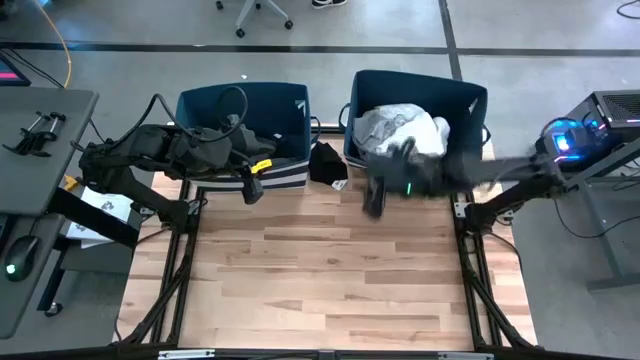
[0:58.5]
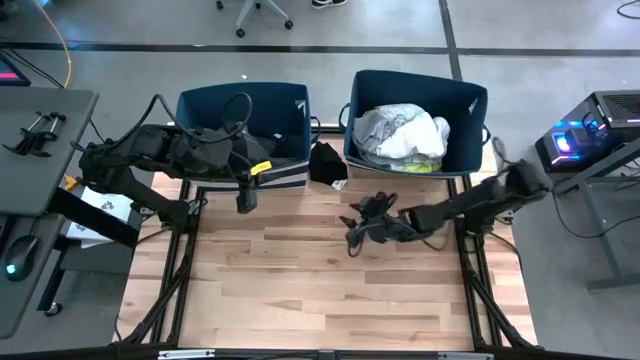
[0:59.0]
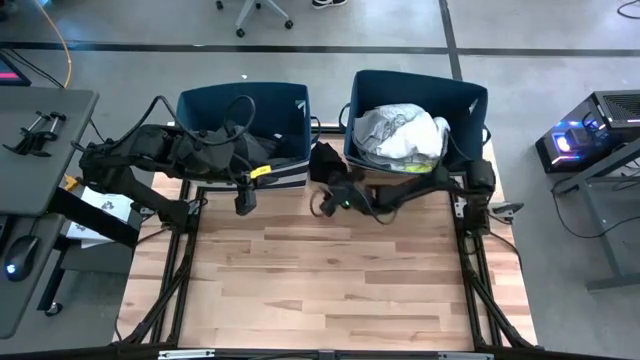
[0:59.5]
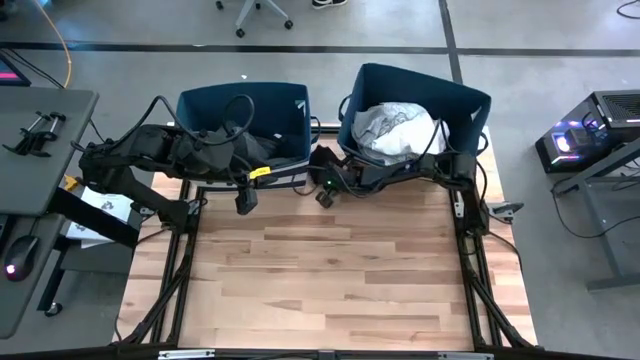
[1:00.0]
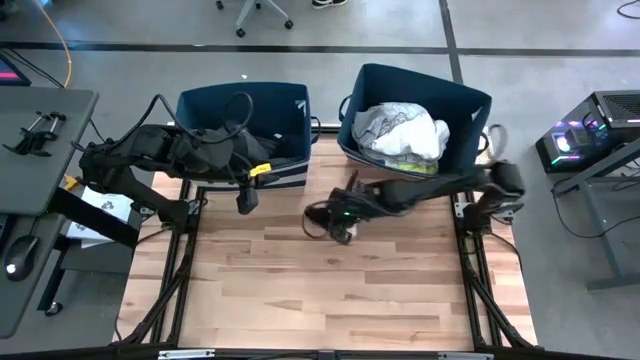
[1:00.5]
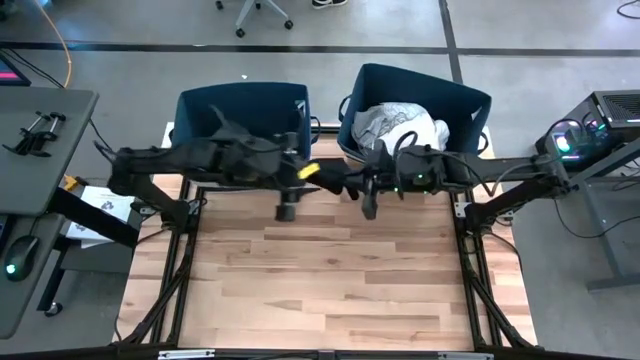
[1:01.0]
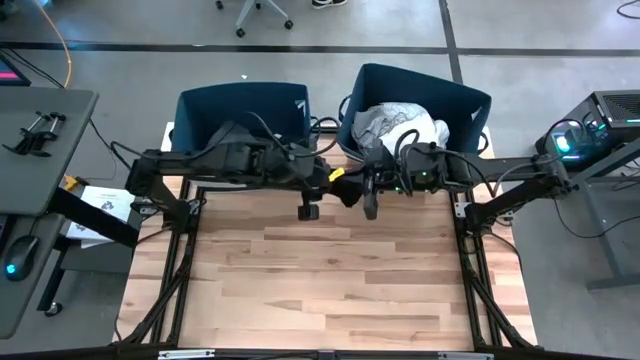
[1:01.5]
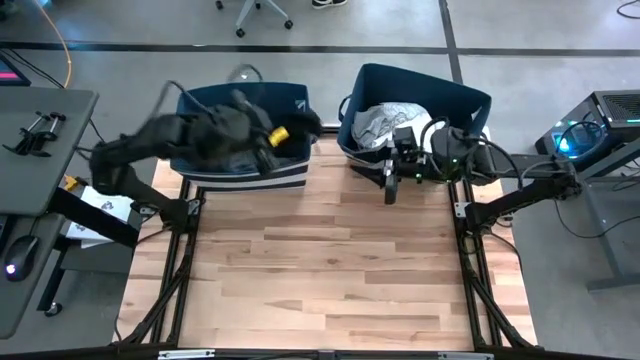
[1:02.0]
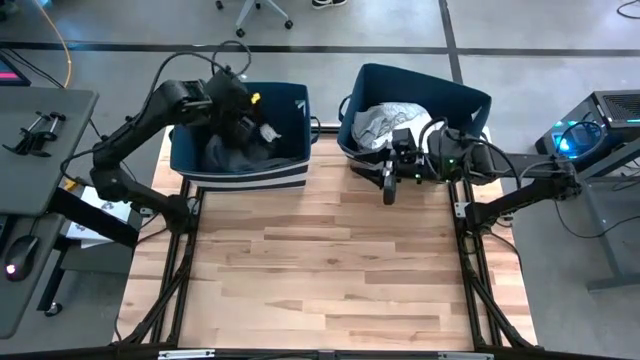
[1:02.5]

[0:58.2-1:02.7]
Task: Sort clothes
Put the black underwear into the left laundry bin

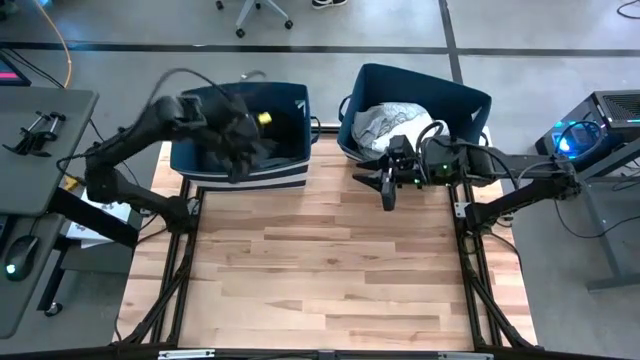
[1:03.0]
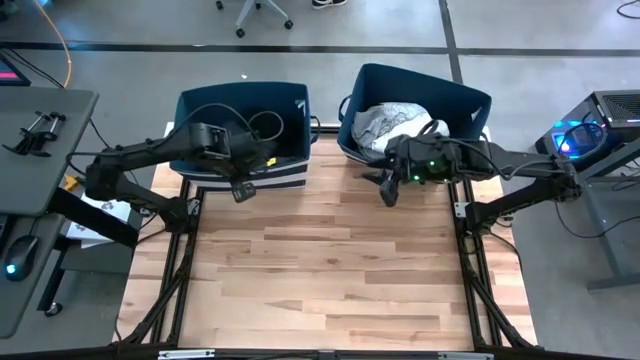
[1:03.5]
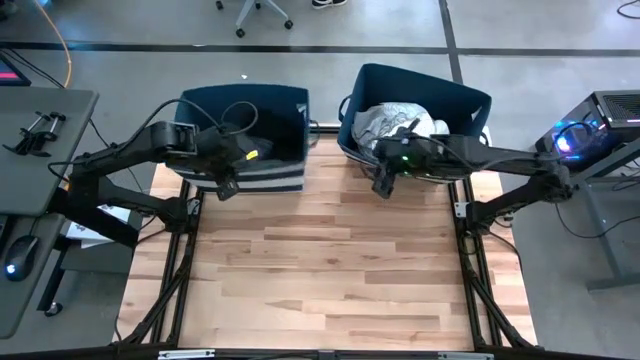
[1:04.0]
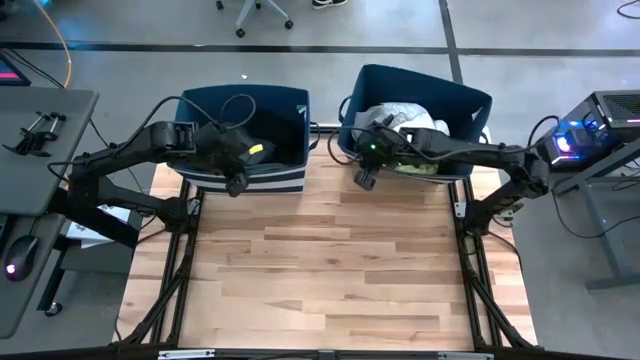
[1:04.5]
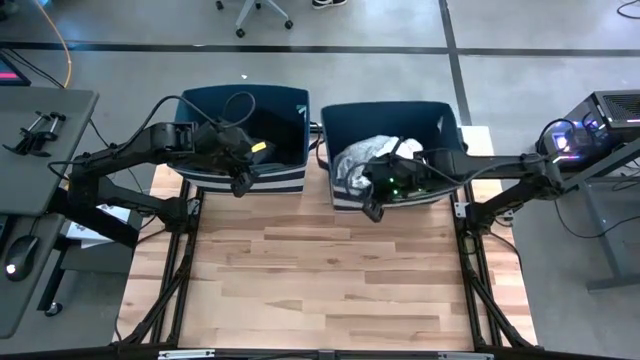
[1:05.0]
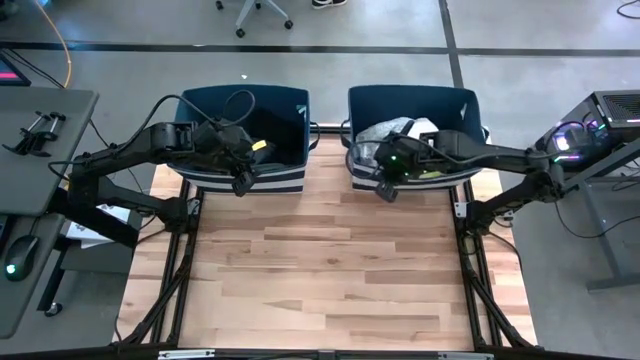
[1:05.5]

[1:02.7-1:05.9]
Adjust the right laundry bin

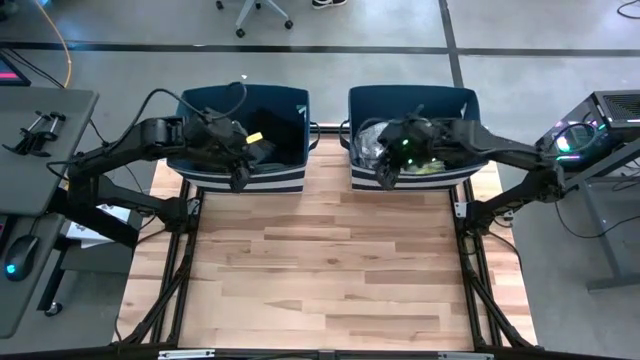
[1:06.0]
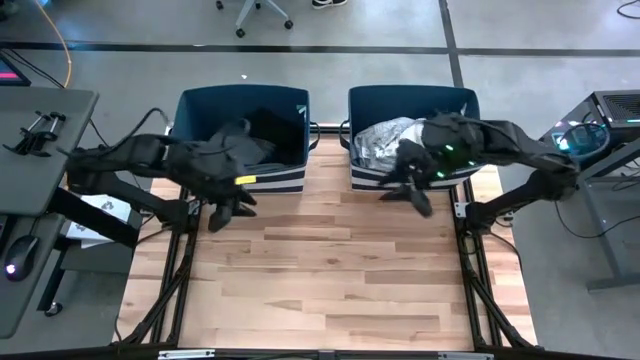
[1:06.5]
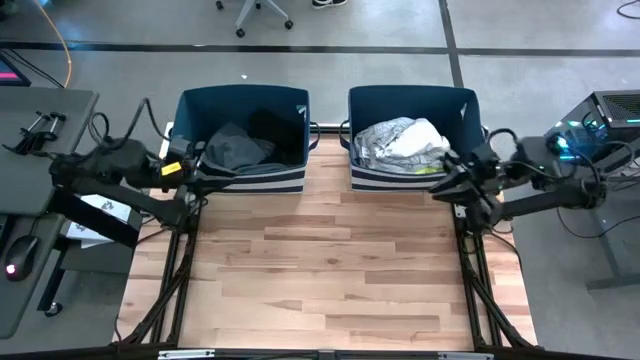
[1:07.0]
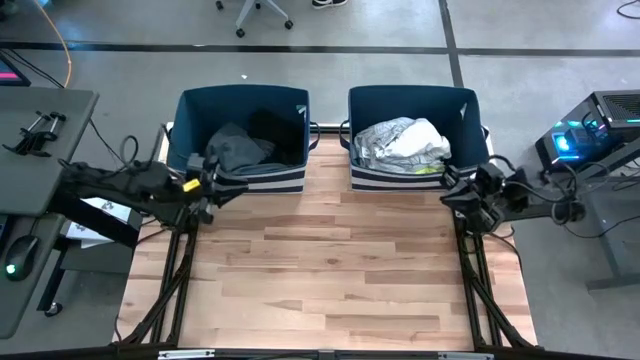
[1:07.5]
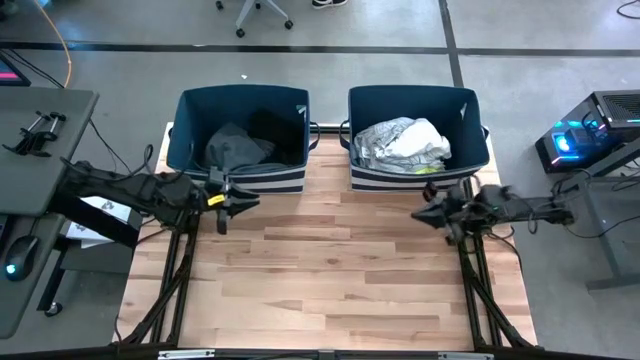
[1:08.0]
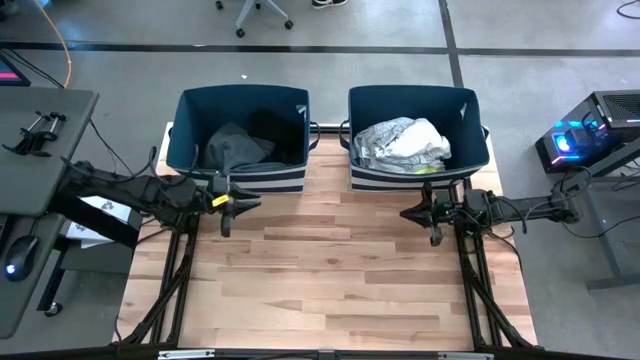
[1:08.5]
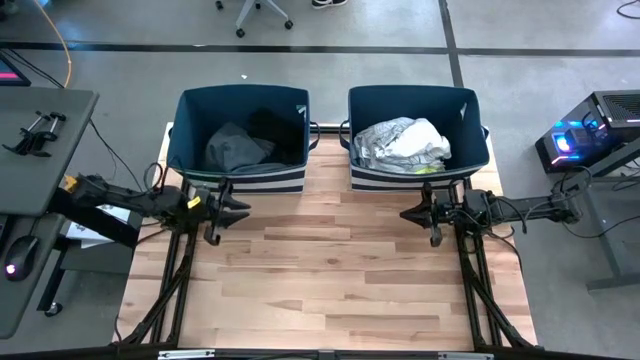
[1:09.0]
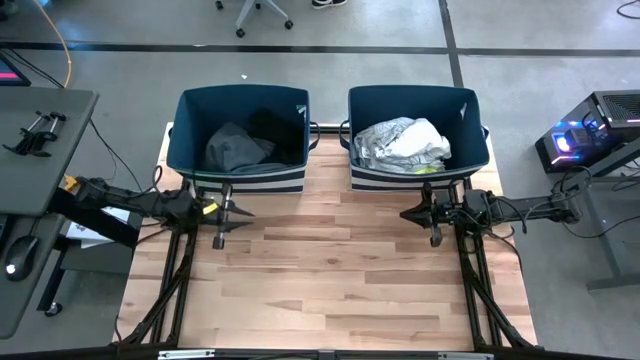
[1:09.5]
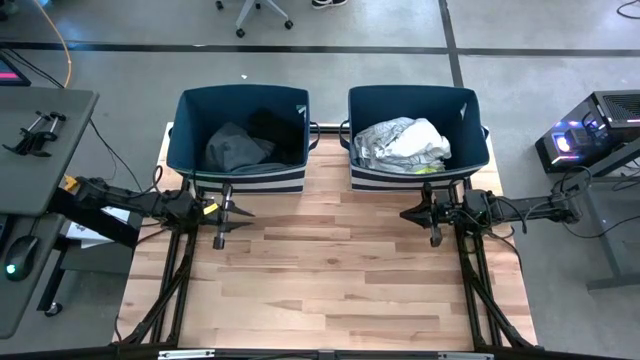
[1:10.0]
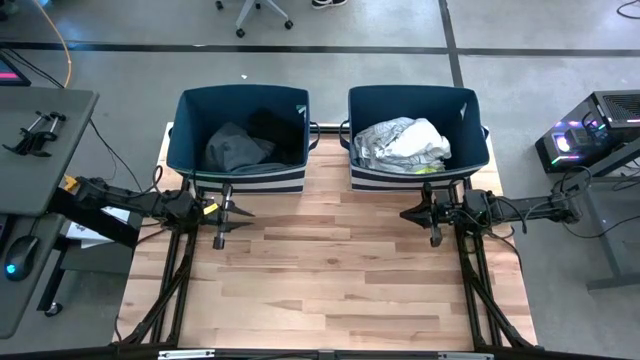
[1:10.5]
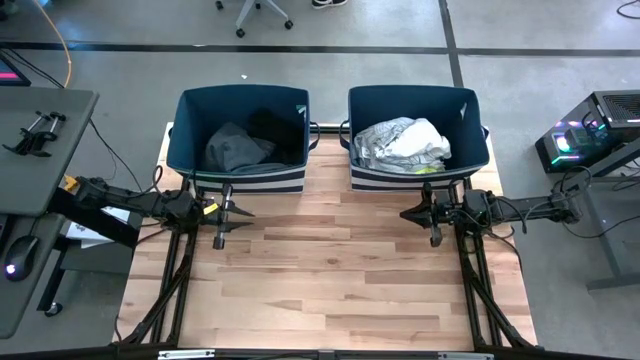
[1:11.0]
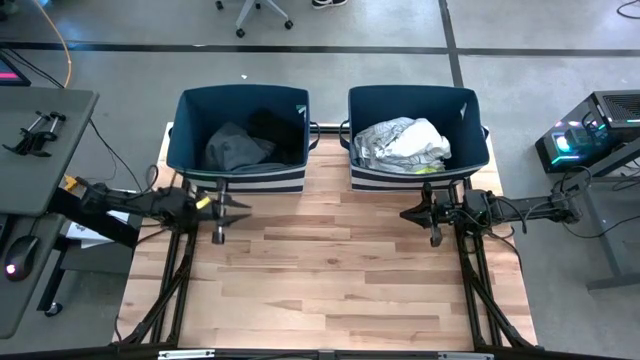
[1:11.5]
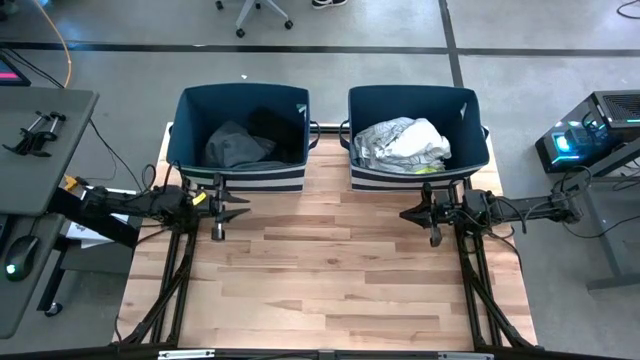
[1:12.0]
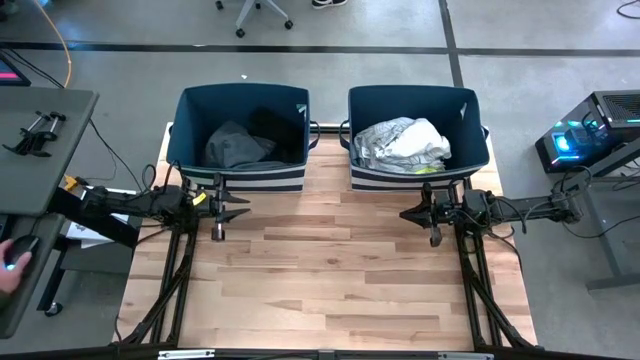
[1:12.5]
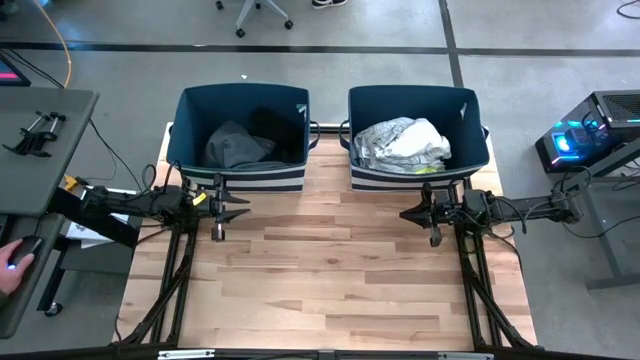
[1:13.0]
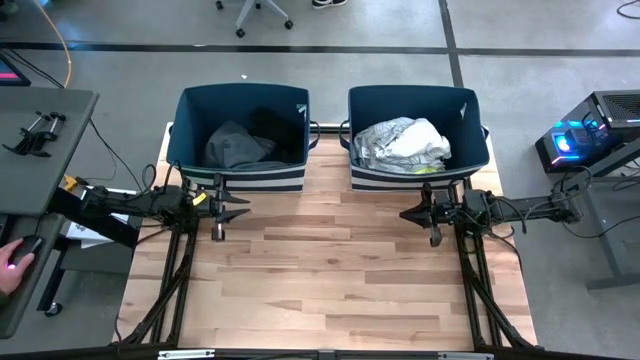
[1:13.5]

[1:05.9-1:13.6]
Return to Home Position

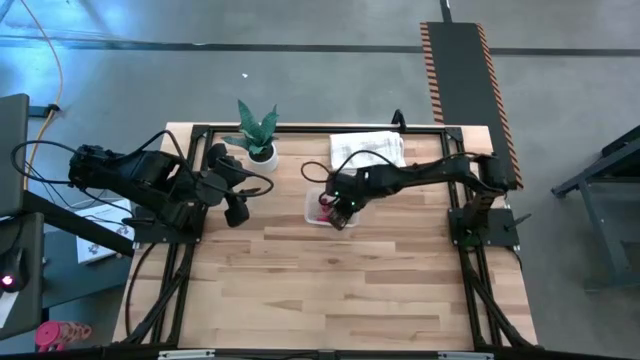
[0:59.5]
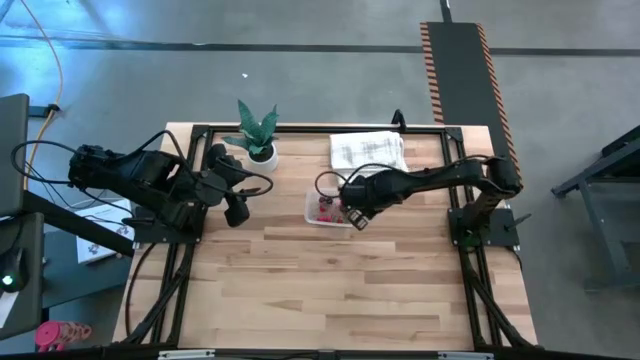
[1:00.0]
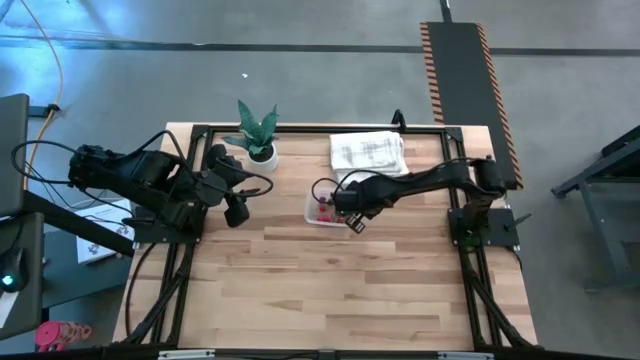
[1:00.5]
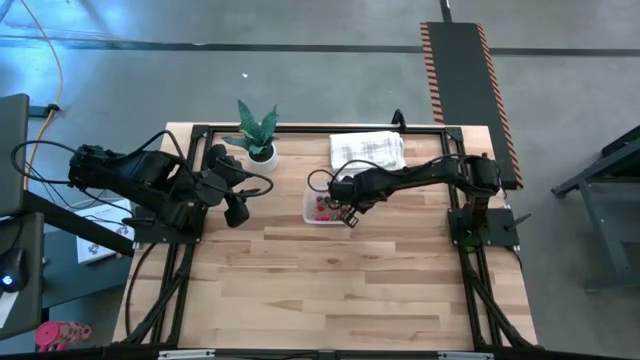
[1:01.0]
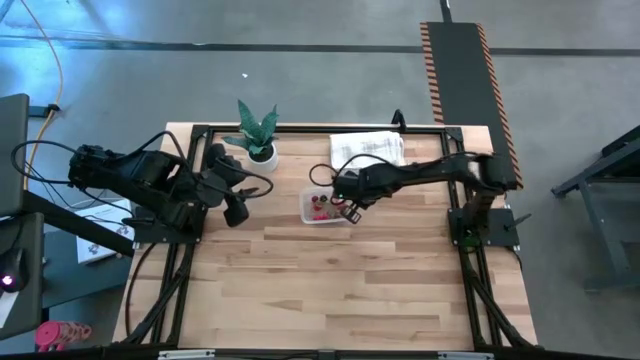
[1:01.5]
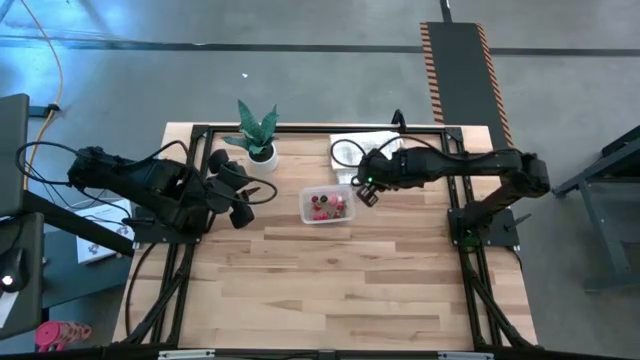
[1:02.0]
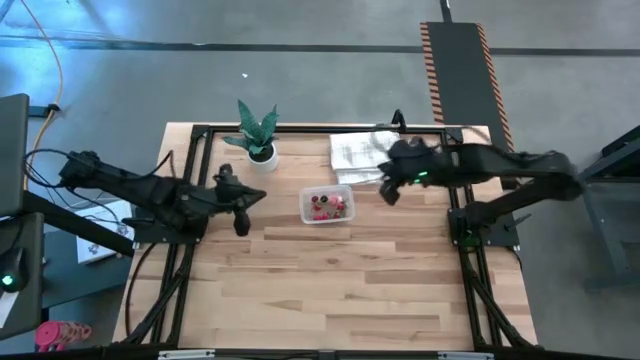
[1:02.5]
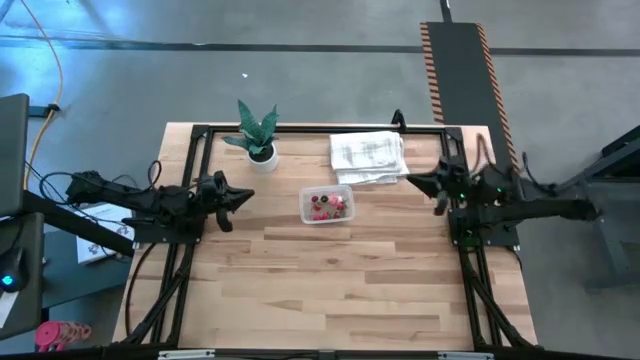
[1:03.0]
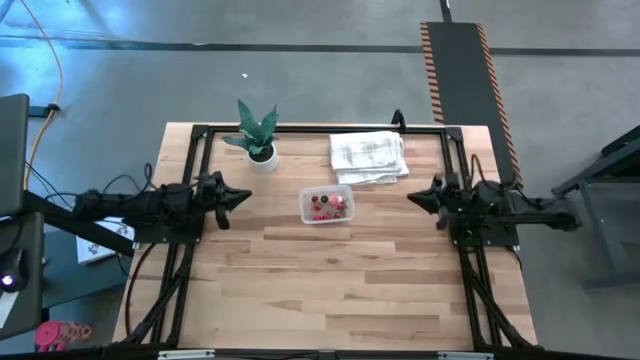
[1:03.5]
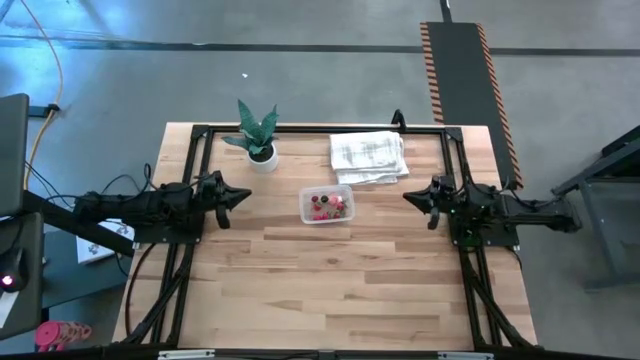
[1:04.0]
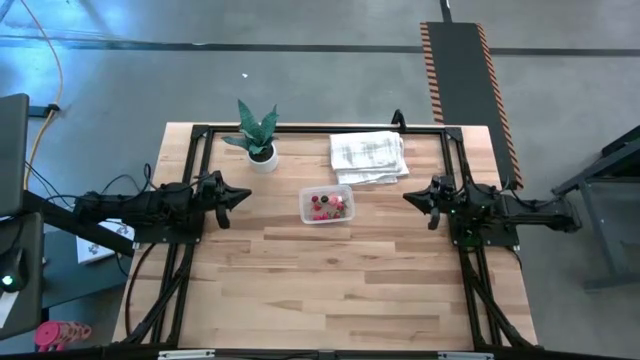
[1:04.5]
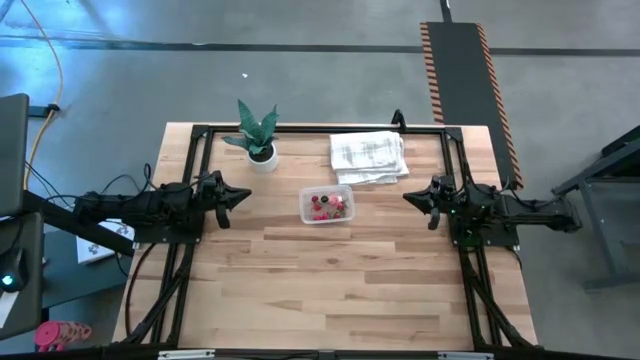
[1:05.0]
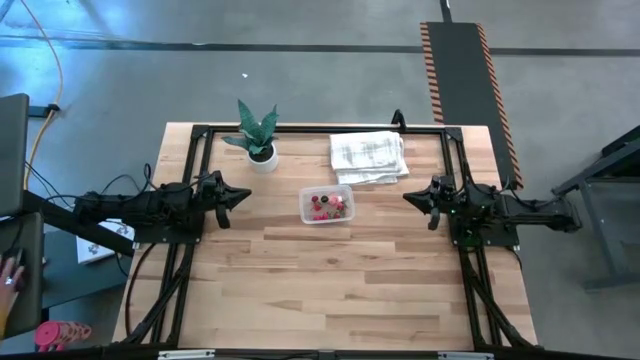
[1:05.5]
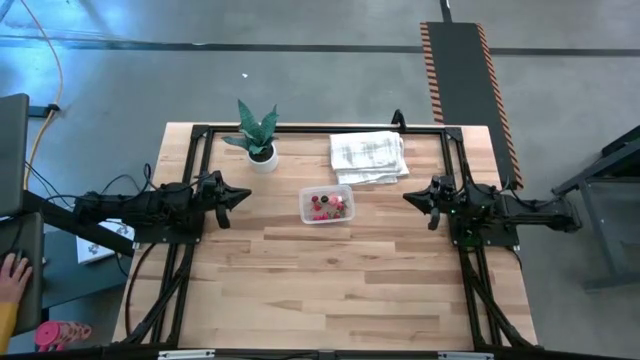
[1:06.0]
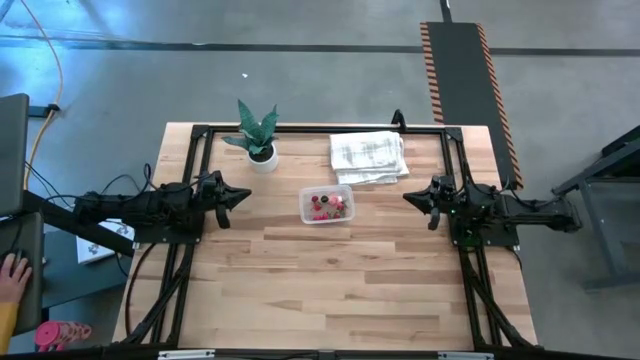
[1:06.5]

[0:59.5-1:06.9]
Task: Pick and placing Produce into tupperware
Return to Home Position
